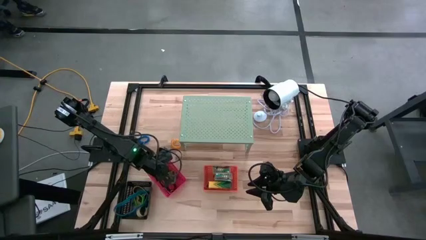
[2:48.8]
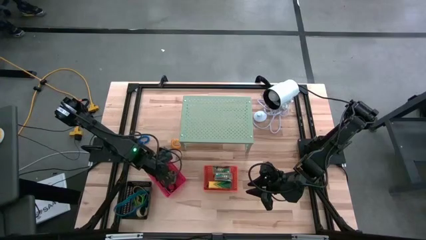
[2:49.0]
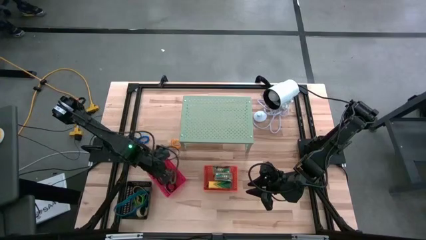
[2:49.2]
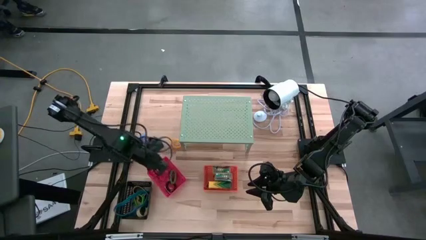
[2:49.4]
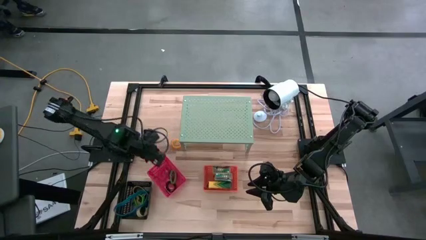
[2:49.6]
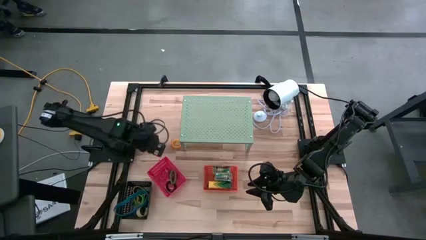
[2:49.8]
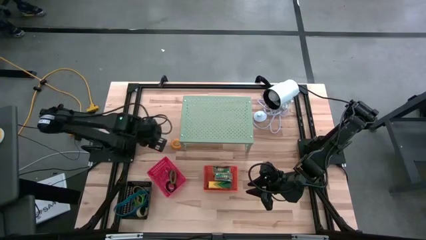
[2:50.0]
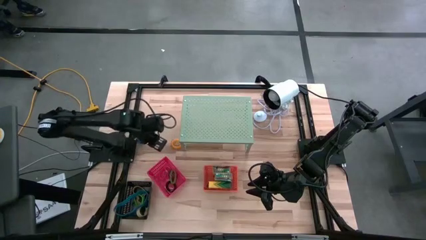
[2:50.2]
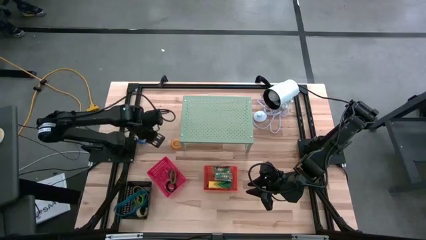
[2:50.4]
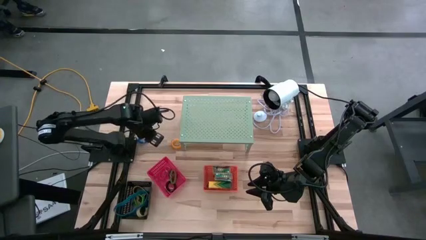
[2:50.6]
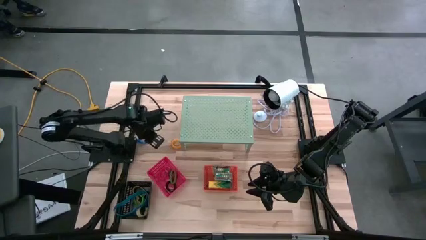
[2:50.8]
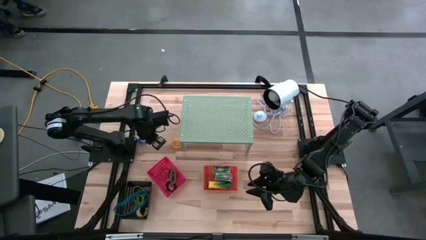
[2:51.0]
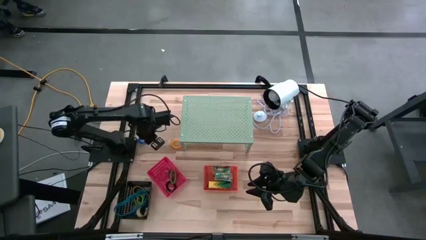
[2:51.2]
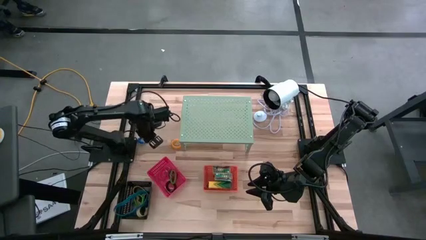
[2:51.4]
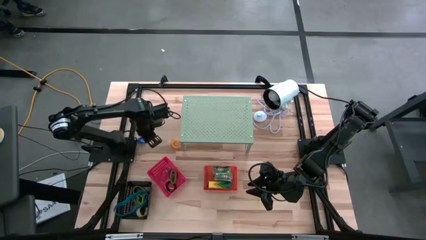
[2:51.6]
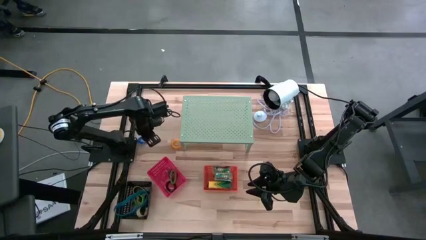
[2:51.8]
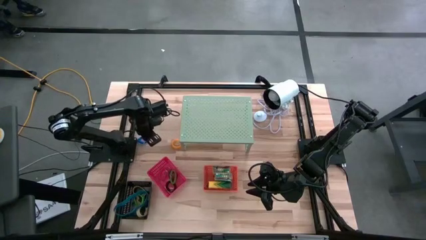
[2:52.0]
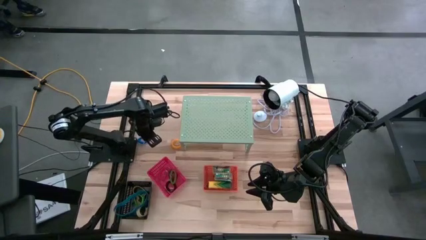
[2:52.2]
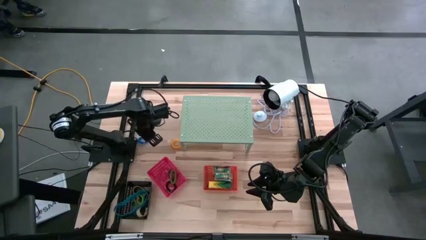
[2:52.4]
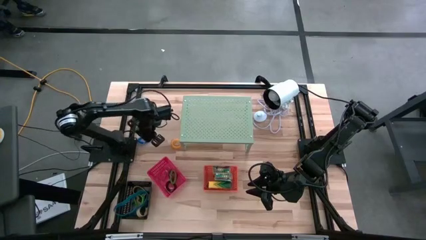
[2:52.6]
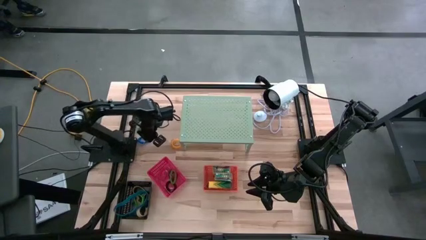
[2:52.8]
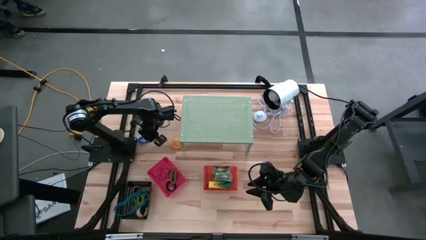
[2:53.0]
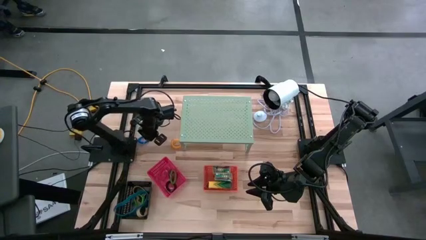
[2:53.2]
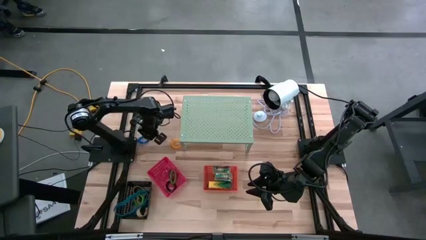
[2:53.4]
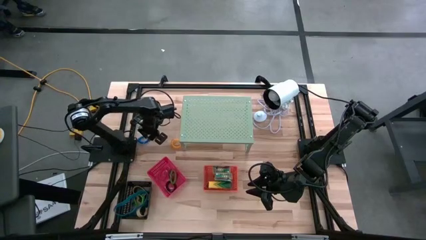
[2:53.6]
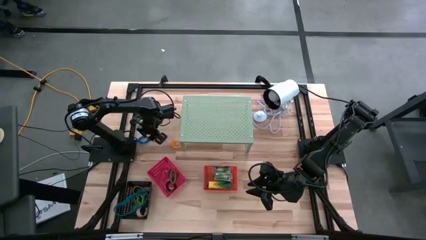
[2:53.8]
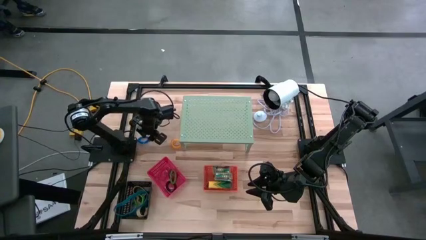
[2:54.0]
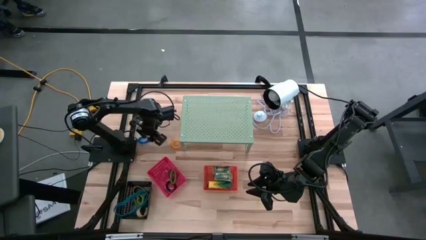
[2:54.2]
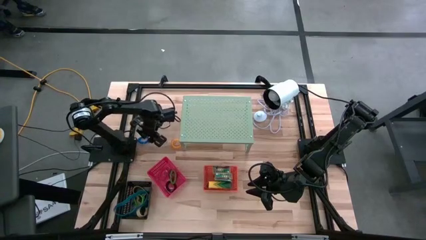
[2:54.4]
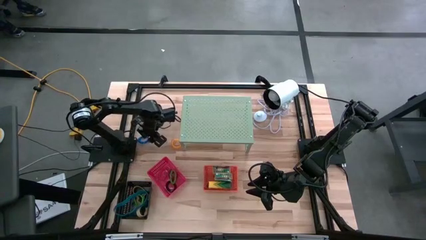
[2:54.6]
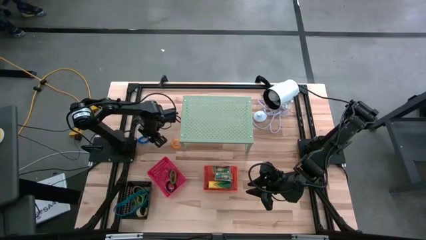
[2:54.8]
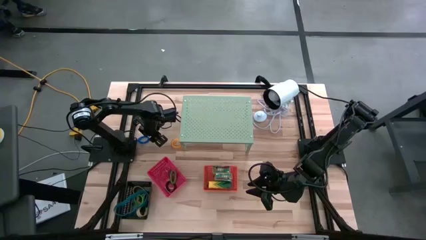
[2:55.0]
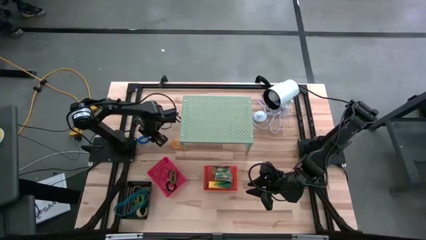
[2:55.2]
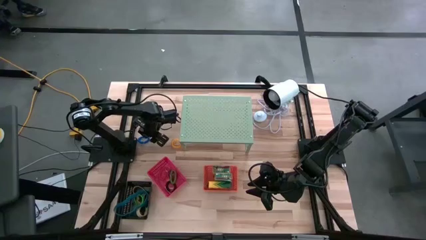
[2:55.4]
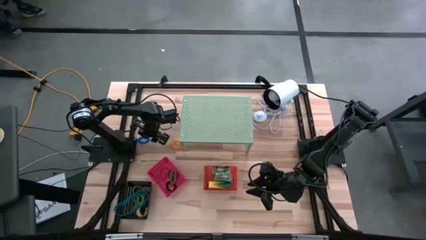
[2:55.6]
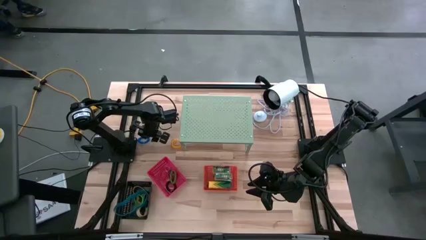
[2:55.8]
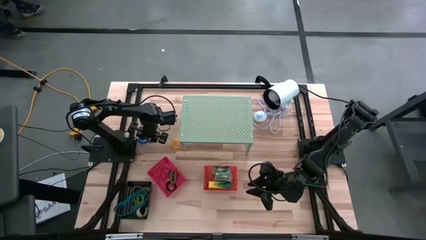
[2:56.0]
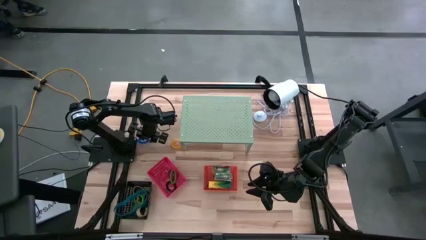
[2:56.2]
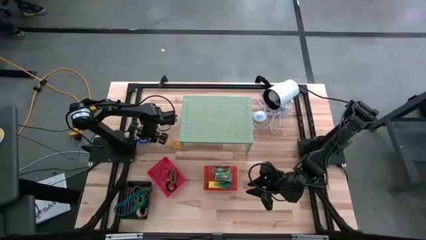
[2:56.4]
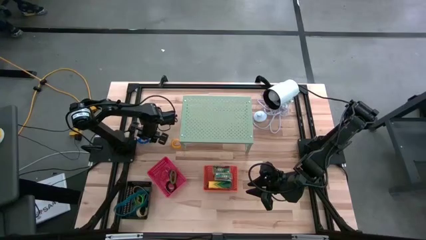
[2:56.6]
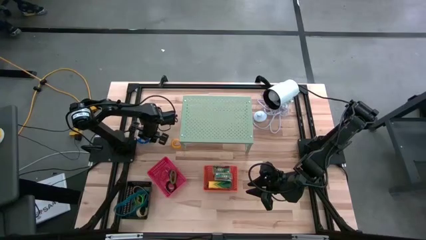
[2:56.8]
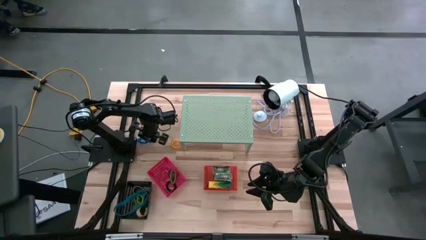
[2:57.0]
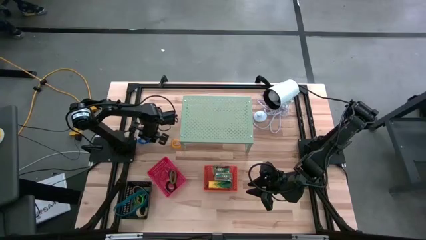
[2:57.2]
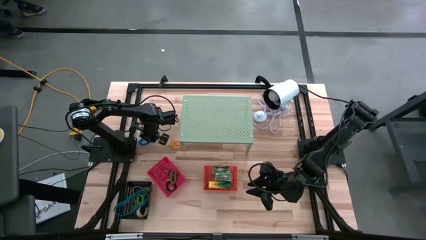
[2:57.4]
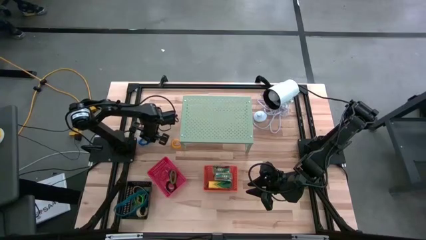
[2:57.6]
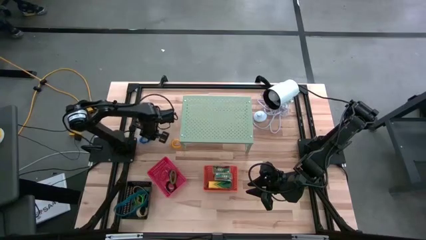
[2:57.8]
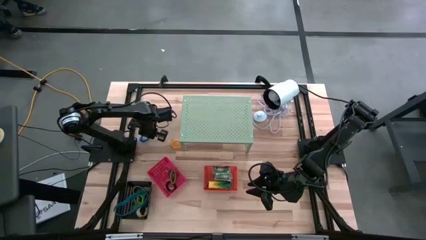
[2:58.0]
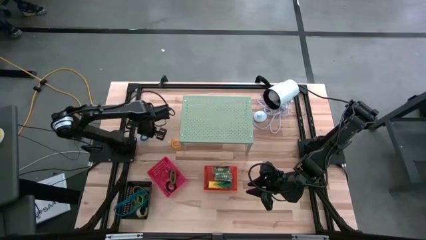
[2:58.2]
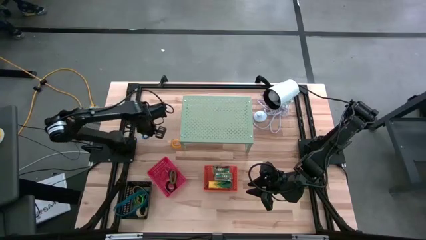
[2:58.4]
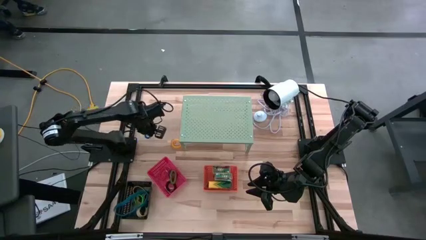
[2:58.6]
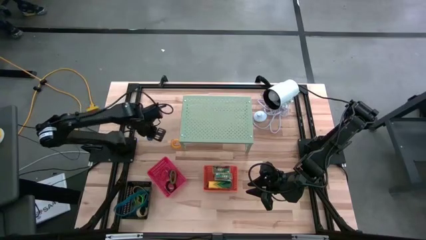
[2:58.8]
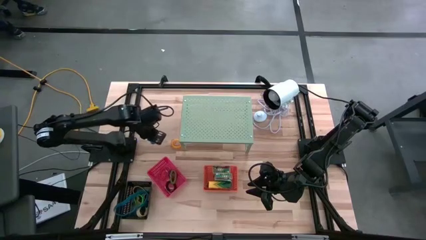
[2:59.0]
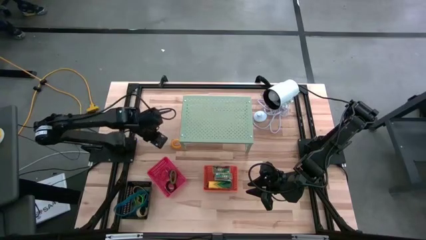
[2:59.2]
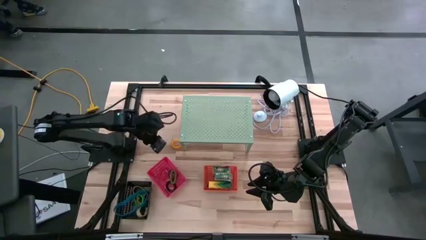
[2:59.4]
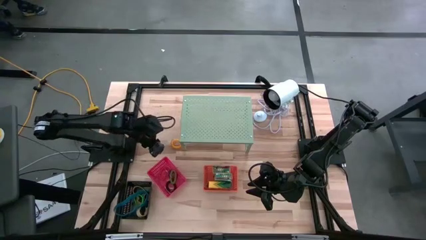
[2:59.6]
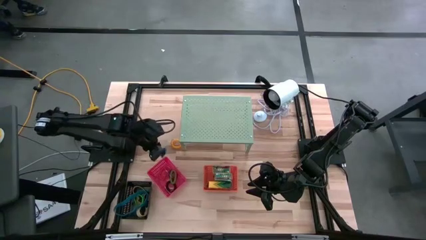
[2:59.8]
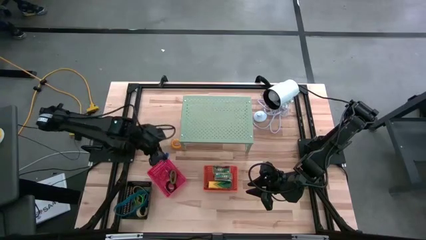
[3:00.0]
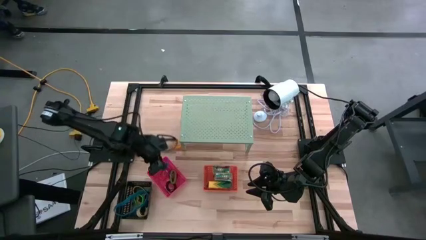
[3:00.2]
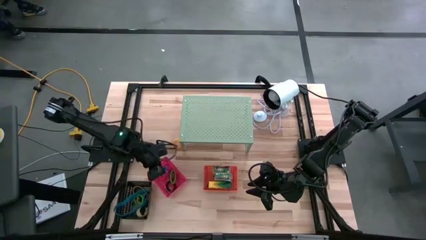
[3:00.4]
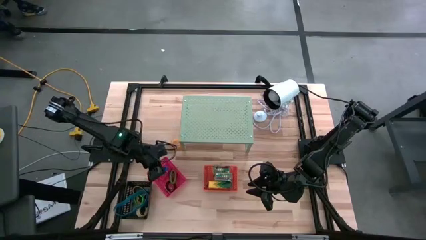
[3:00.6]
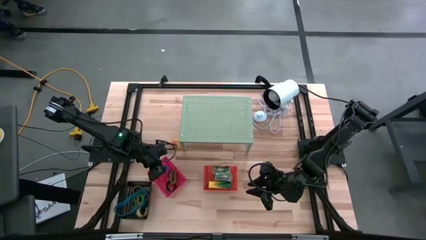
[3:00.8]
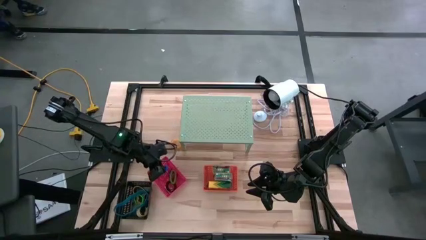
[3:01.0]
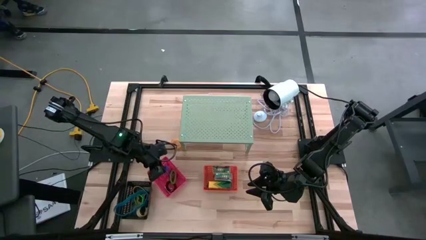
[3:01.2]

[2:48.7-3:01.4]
Task: Pick & Place Office Desk Supplies
Put the blue spring keychain into the red bin

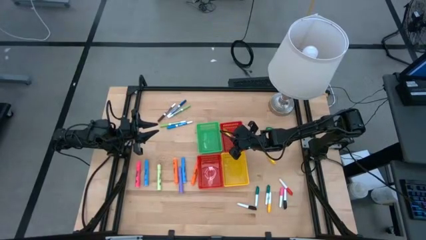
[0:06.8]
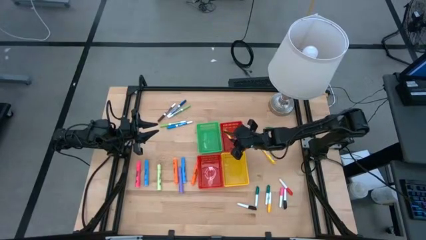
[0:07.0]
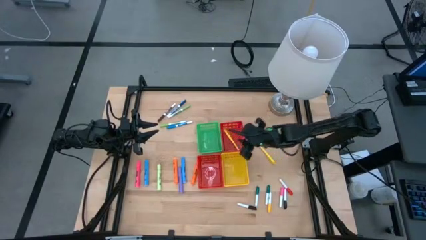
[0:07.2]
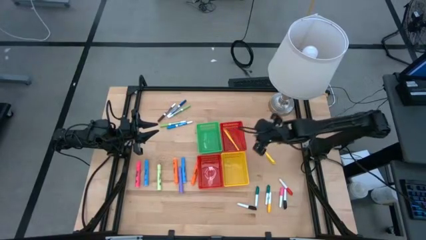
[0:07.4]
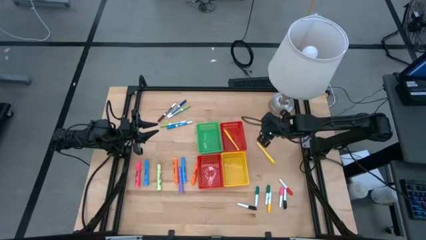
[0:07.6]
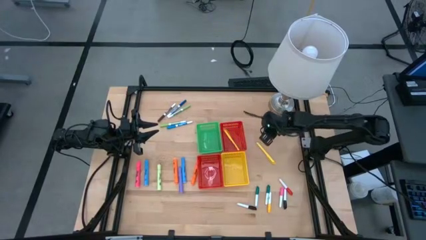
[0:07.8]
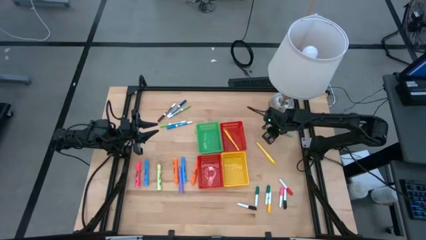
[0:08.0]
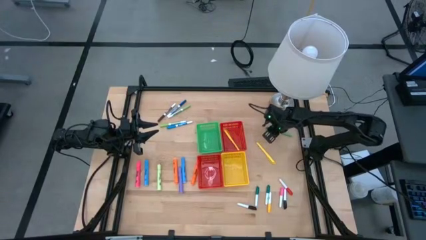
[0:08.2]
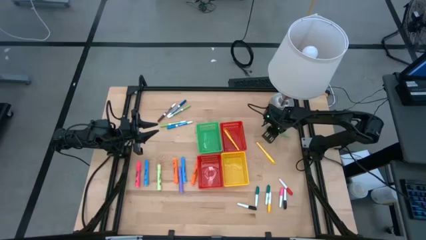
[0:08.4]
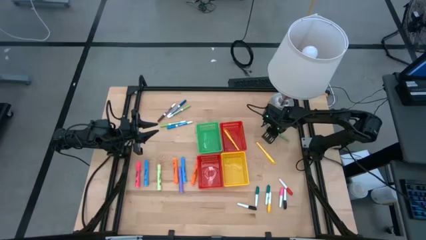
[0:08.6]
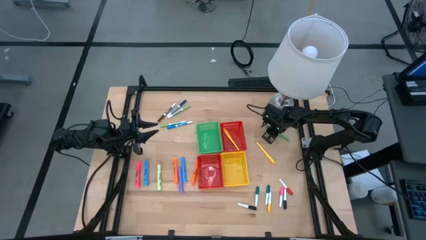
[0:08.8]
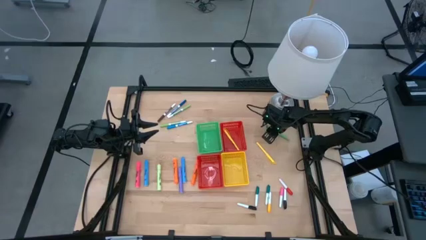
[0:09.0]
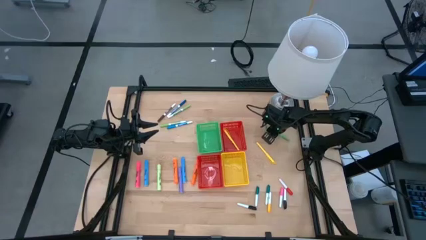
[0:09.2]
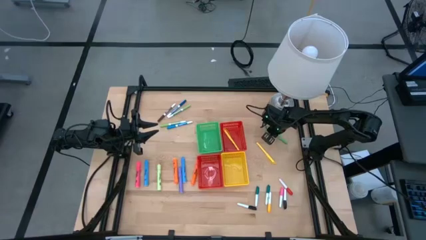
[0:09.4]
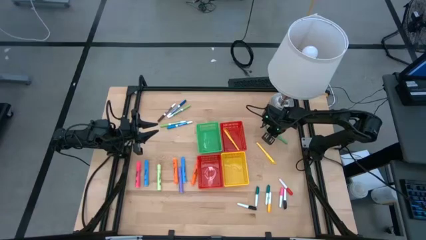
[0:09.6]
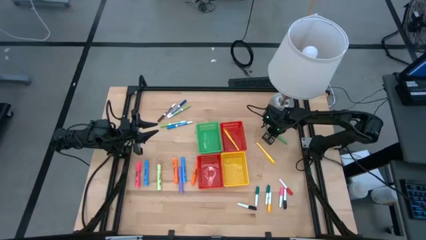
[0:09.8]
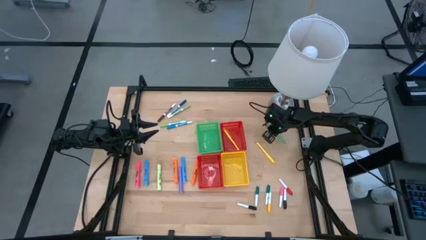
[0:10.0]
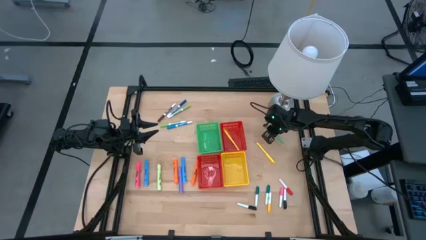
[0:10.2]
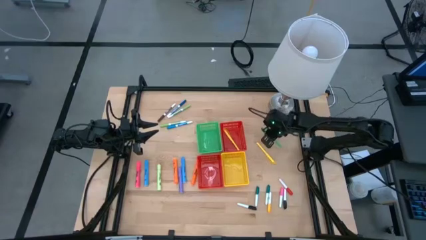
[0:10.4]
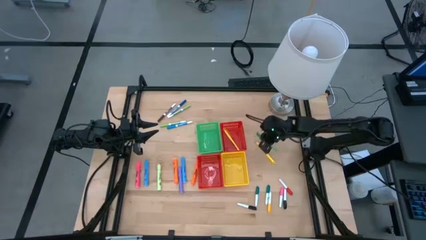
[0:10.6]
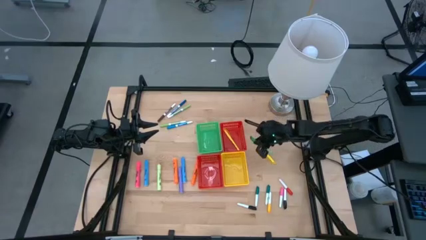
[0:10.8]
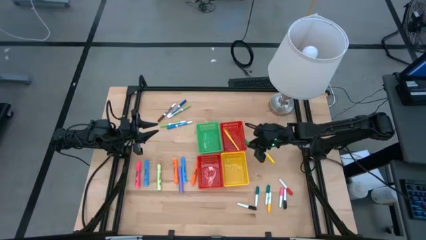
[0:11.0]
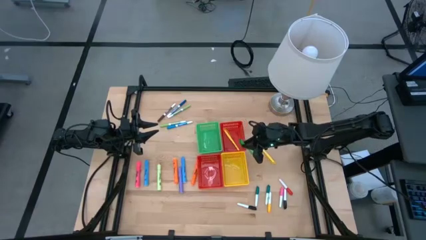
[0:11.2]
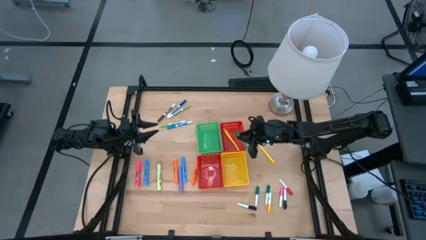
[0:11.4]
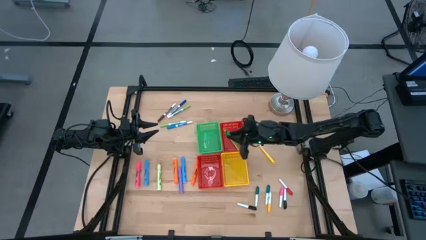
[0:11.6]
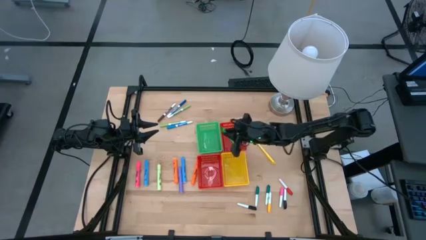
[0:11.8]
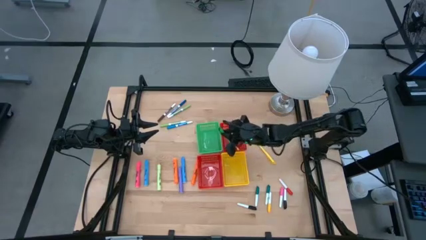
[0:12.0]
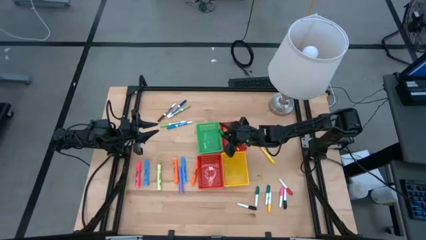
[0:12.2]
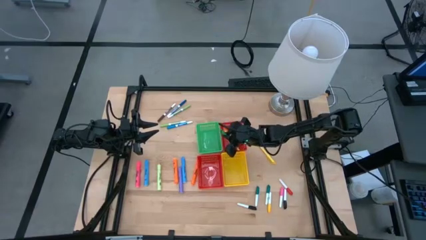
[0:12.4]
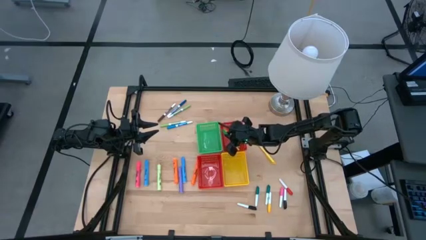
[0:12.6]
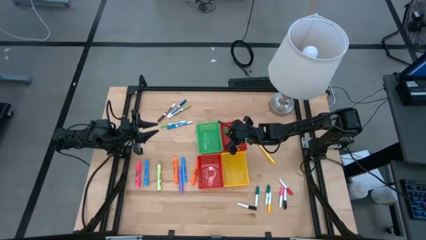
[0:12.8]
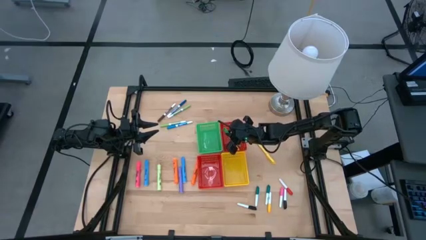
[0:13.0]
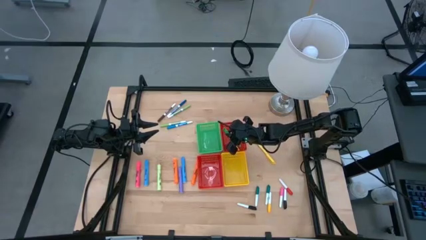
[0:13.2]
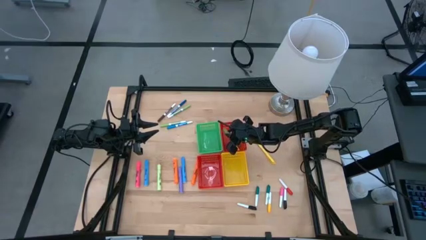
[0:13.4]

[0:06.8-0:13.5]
Task: Pick & Place Markers
Put the green pen into the top red bin
